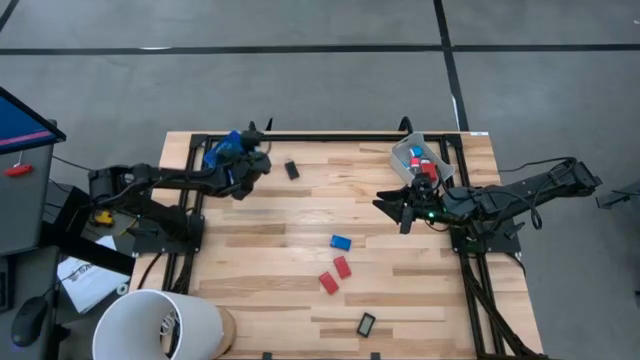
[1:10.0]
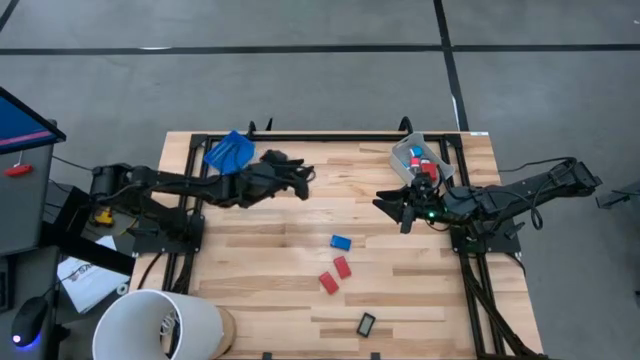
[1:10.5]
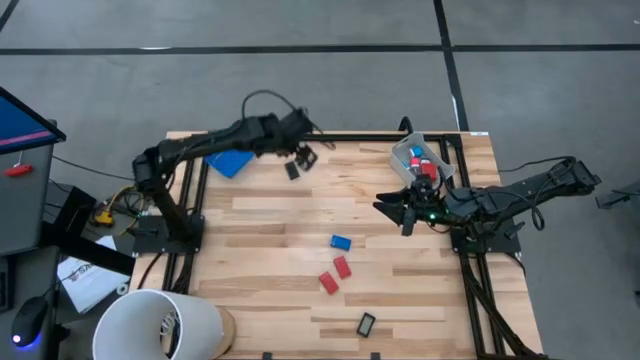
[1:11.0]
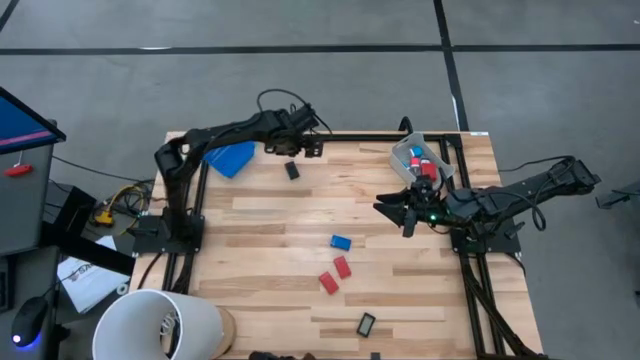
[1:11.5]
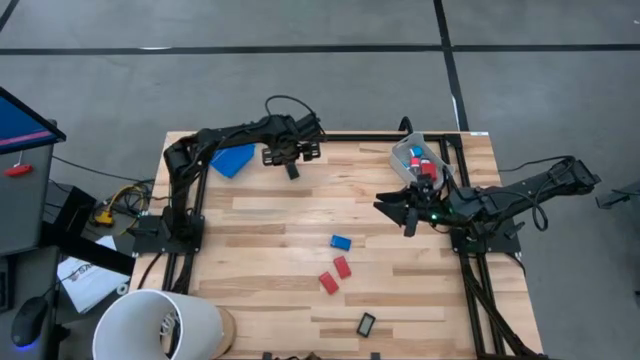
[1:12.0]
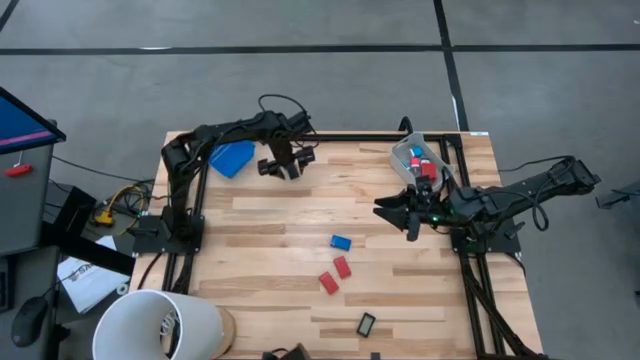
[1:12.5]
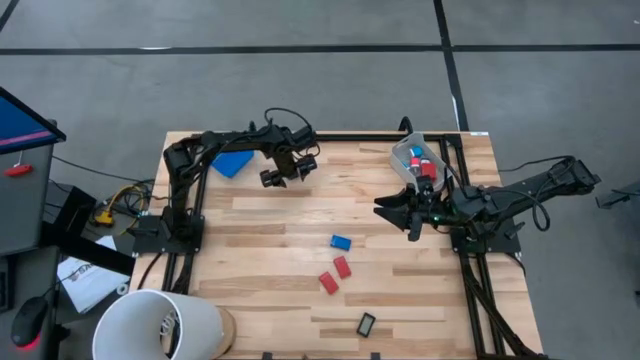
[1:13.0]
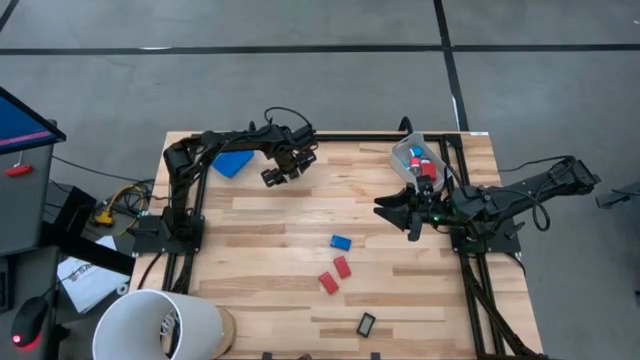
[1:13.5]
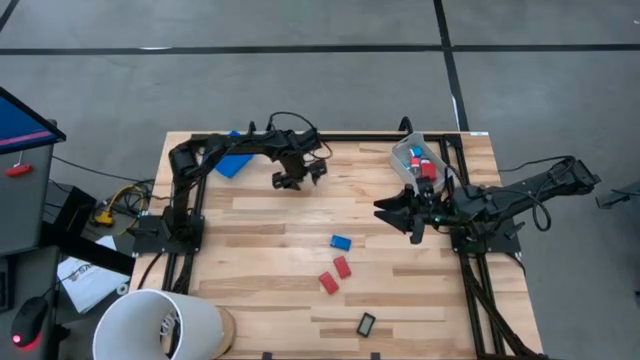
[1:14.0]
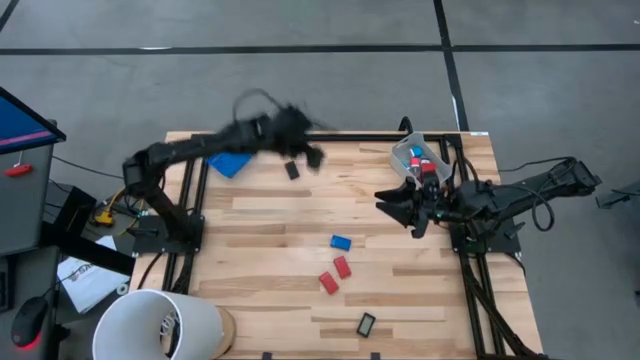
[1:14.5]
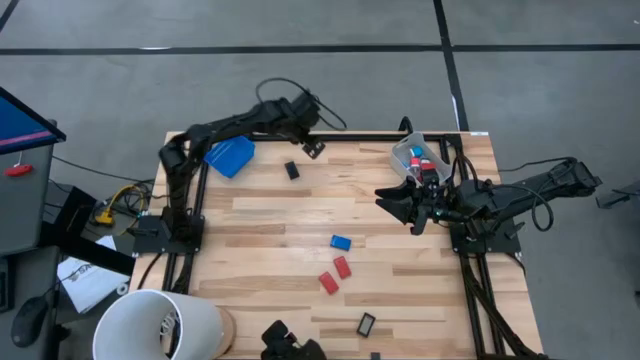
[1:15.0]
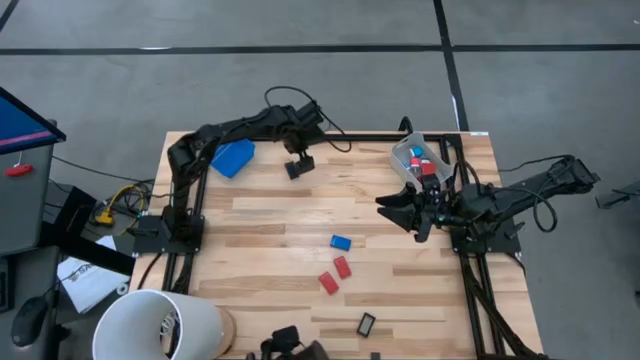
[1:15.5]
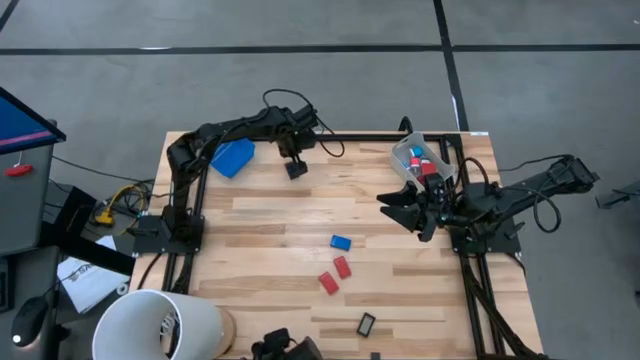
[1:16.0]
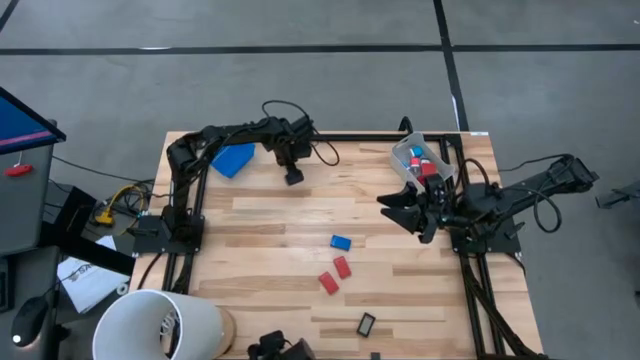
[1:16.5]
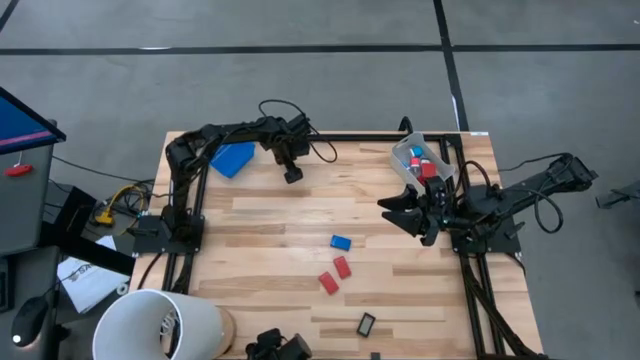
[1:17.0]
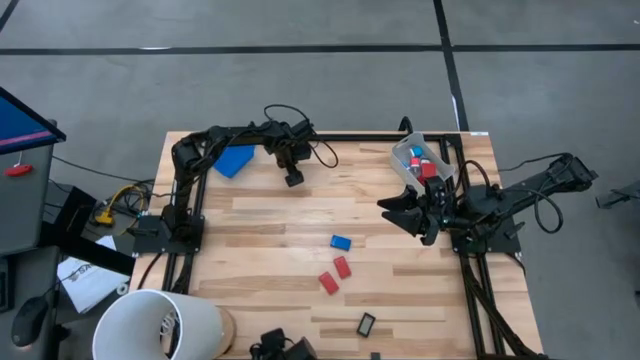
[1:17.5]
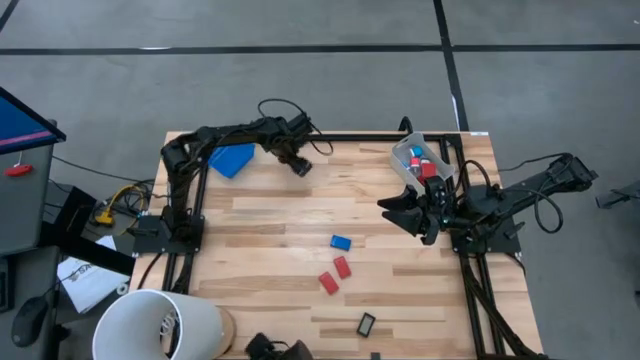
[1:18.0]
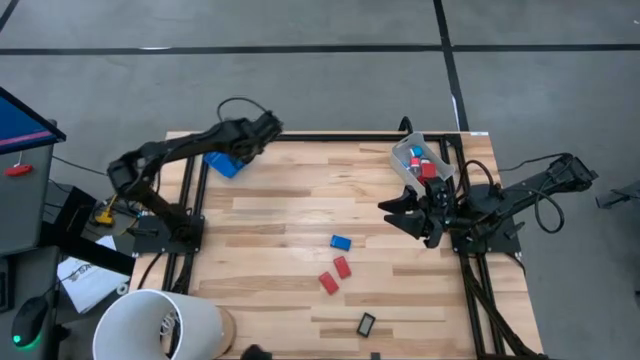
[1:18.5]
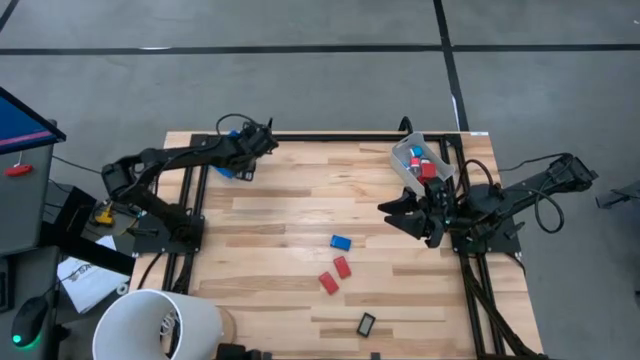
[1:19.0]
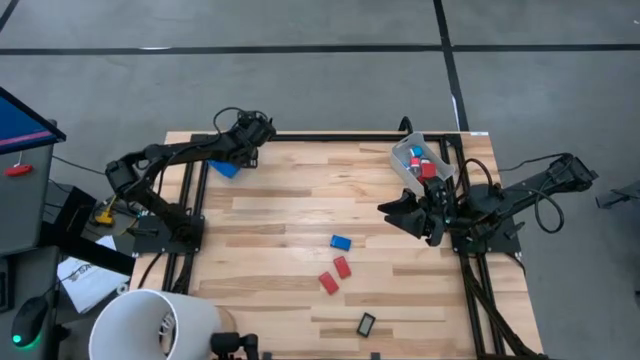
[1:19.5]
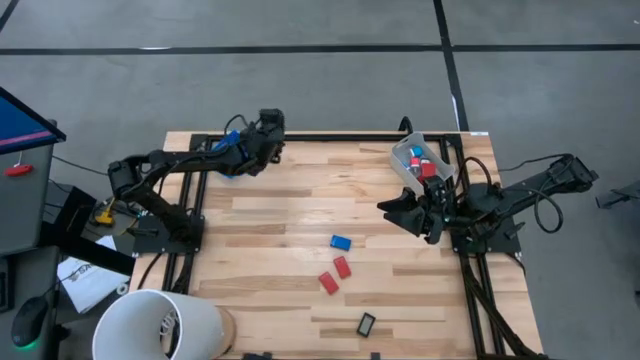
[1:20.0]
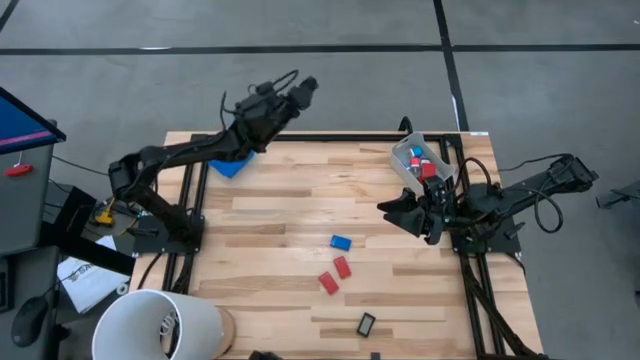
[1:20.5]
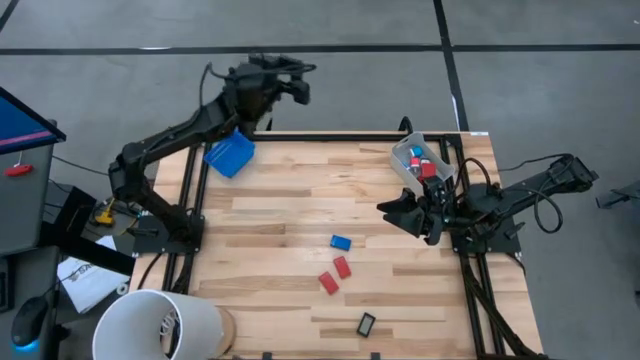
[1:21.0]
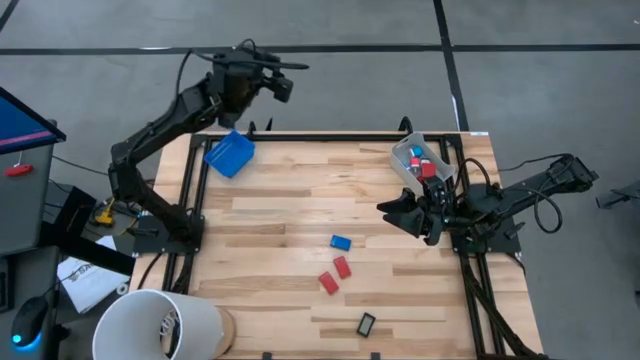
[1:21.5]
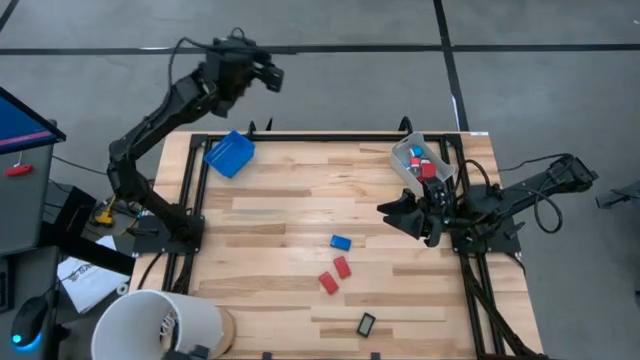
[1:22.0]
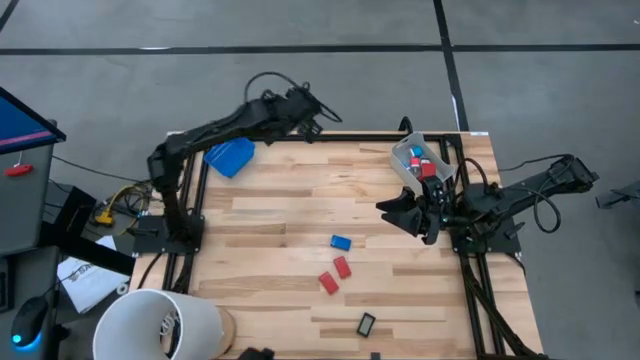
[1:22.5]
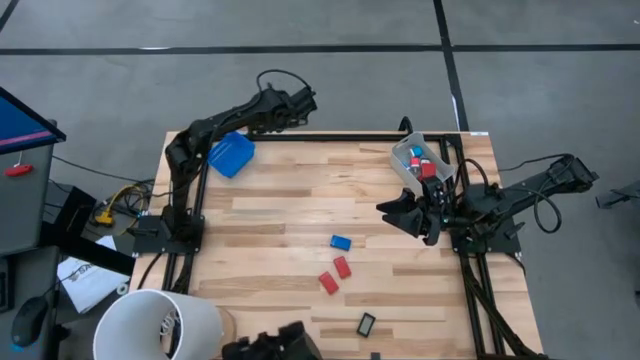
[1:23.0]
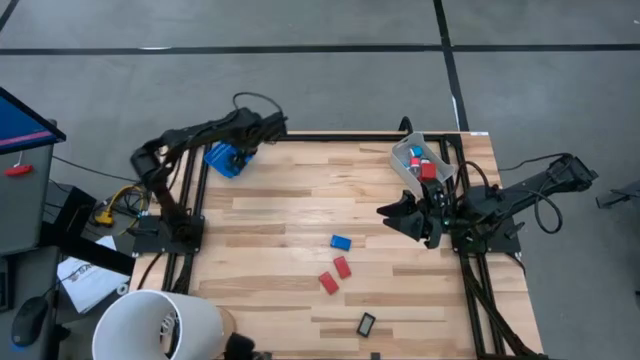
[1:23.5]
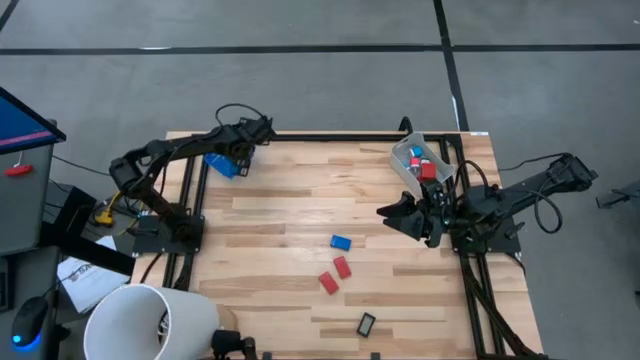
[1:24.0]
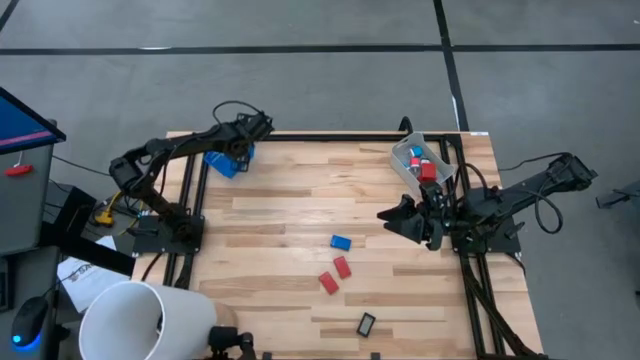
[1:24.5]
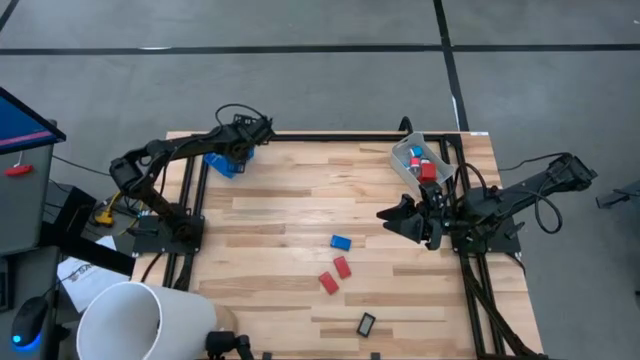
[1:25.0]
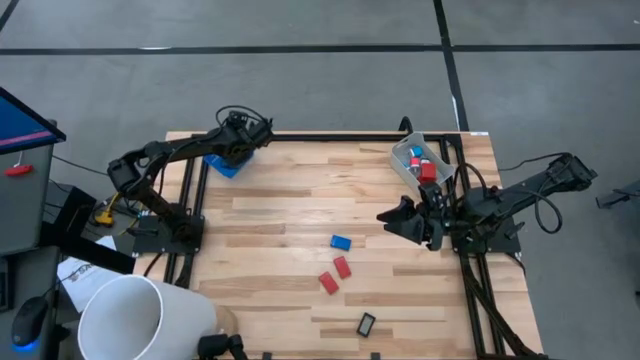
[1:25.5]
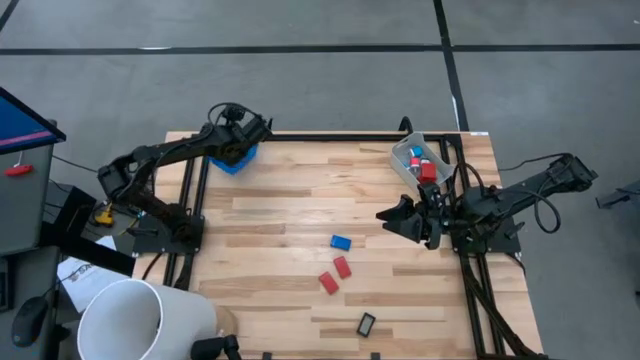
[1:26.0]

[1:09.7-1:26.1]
Task: Pick & Place Office items
Put the top black clock into the blue bin

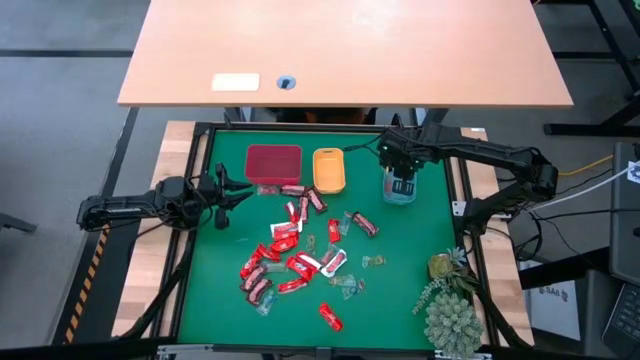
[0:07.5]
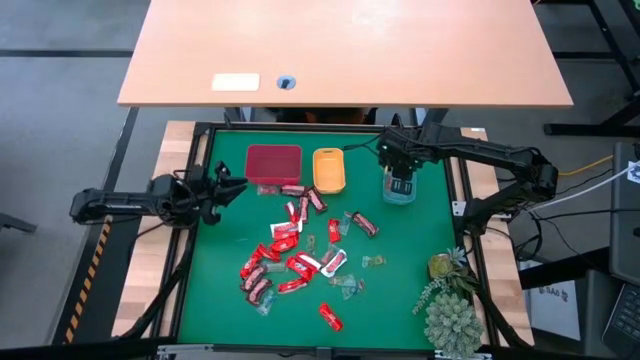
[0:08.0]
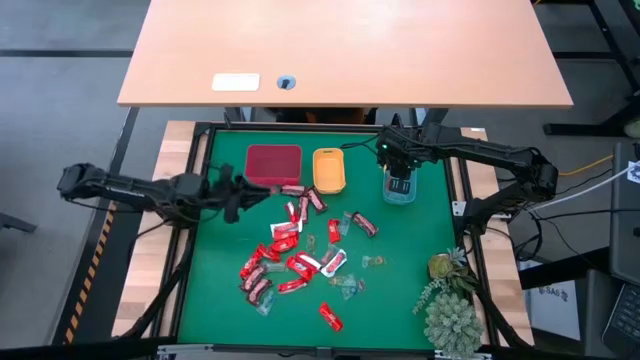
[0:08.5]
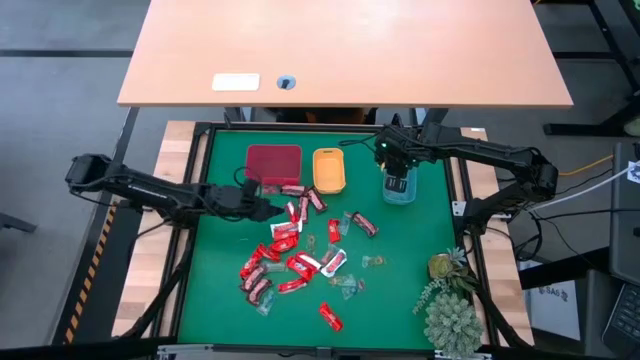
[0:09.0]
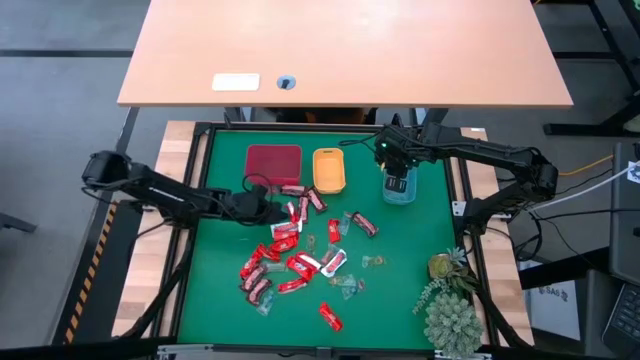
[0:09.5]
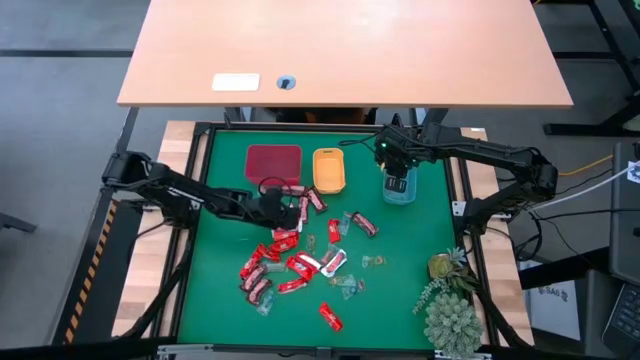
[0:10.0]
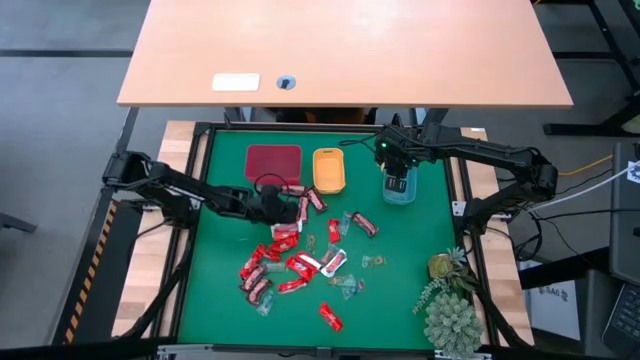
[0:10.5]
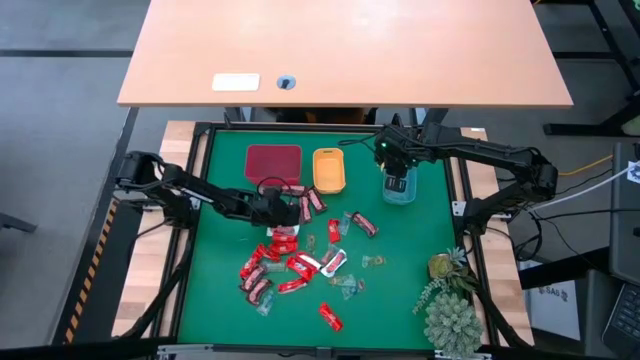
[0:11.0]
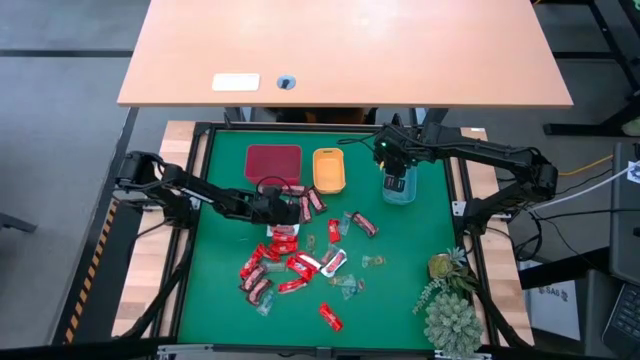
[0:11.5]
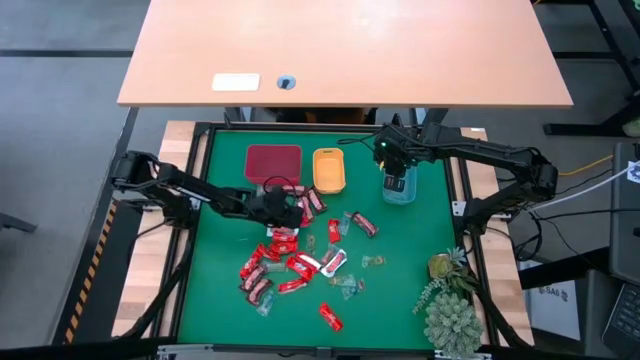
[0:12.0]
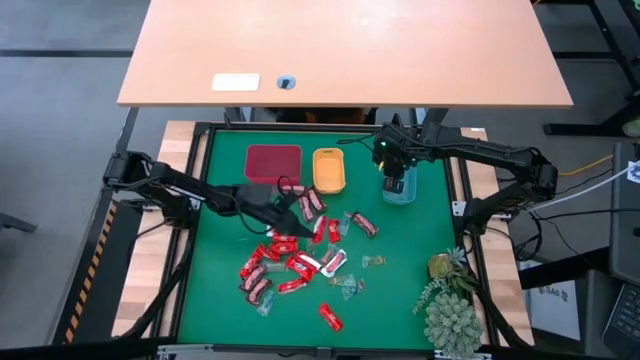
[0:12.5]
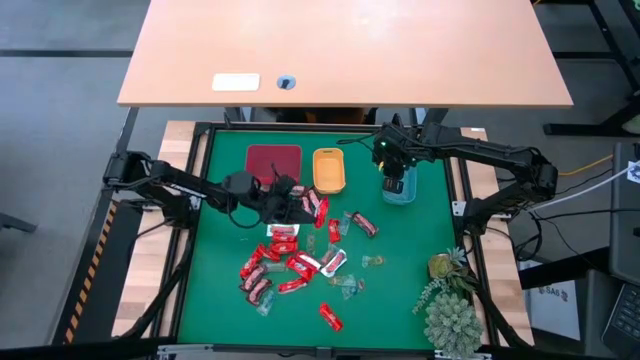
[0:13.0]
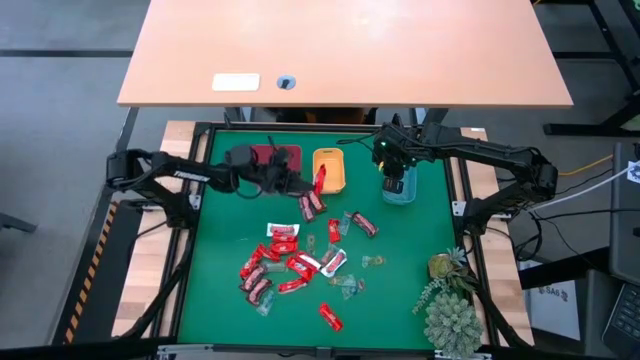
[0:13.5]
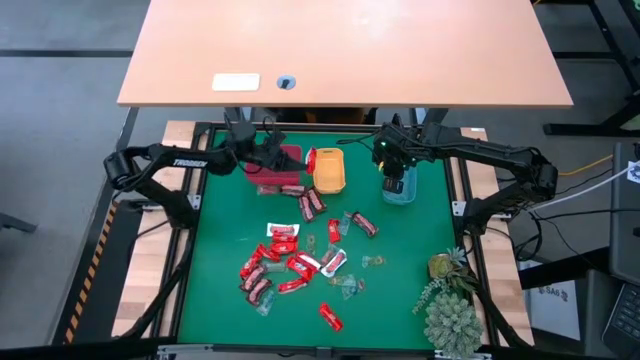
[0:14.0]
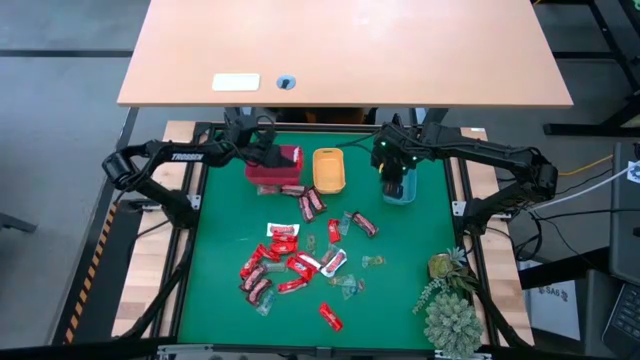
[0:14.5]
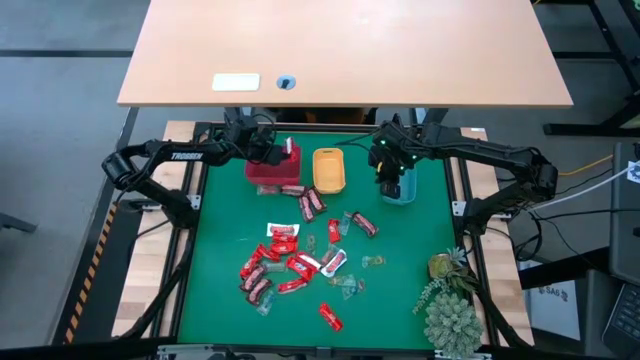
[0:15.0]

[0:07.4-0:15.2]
Task: Sort candy
Put the red chocolate bar into the red bin
